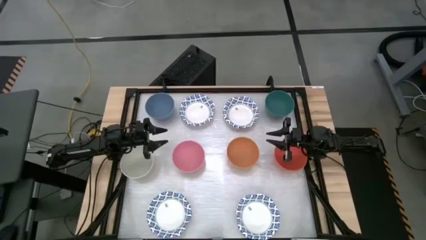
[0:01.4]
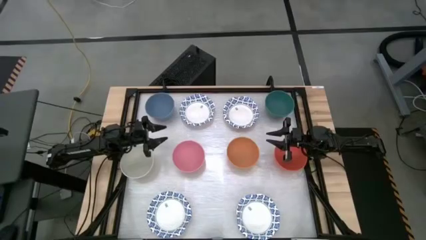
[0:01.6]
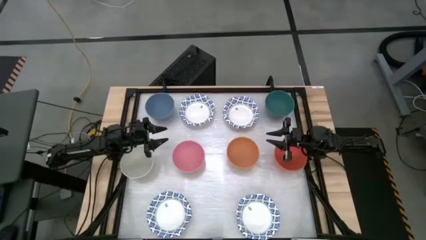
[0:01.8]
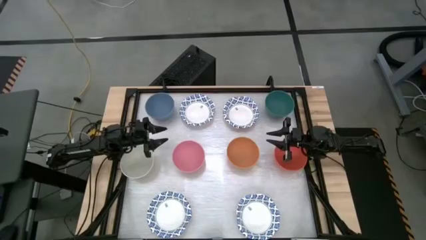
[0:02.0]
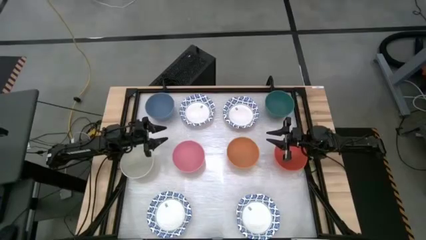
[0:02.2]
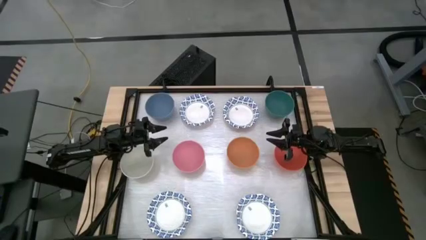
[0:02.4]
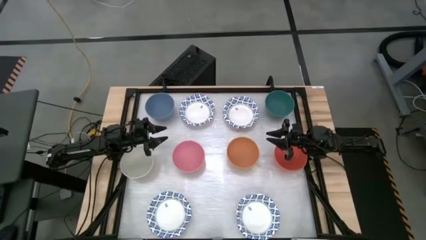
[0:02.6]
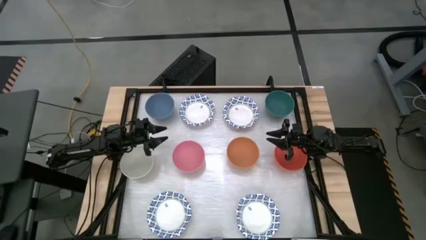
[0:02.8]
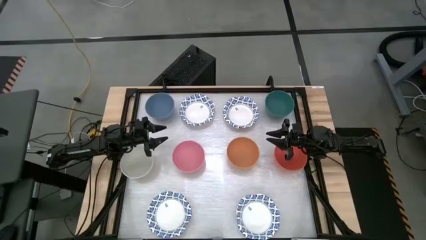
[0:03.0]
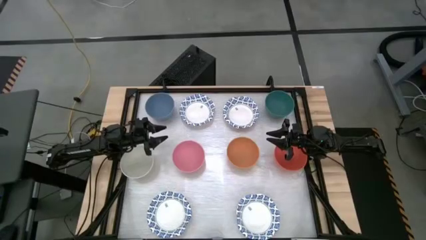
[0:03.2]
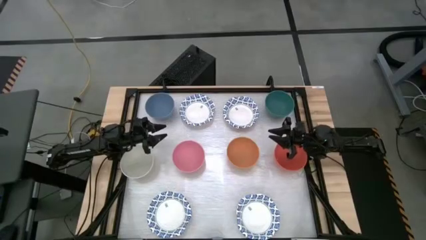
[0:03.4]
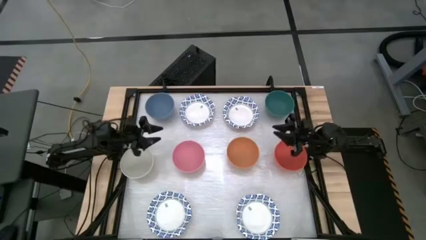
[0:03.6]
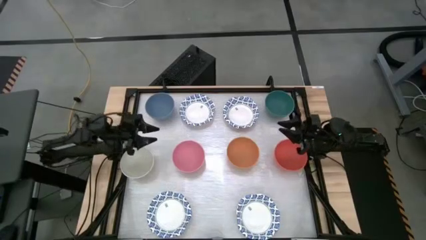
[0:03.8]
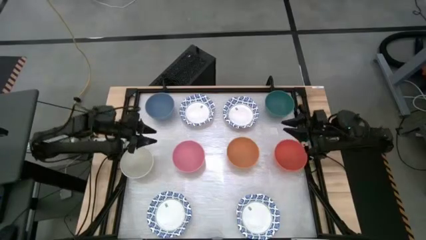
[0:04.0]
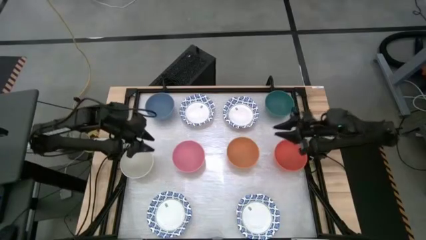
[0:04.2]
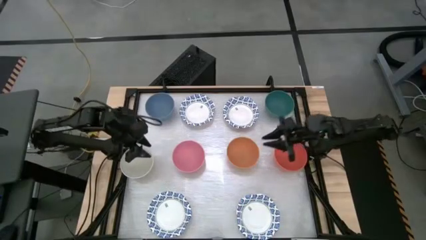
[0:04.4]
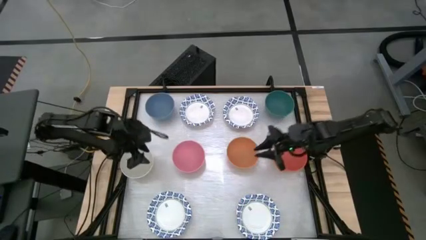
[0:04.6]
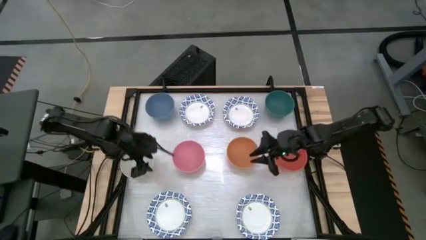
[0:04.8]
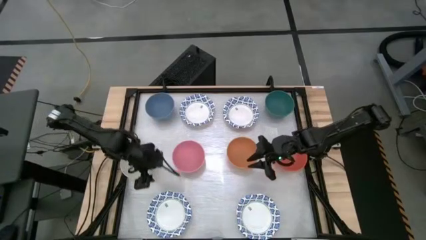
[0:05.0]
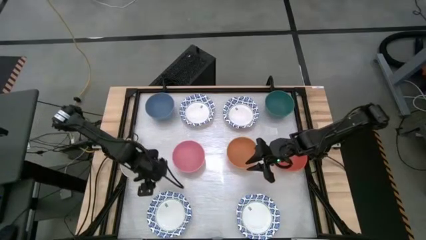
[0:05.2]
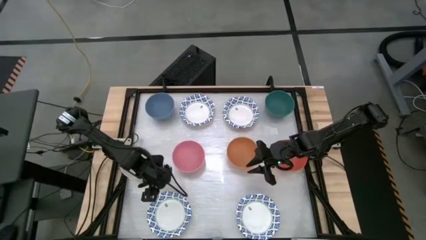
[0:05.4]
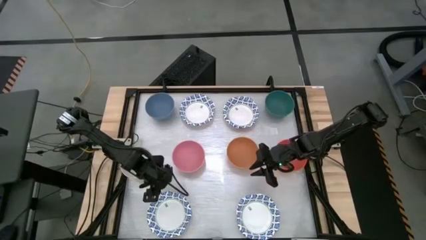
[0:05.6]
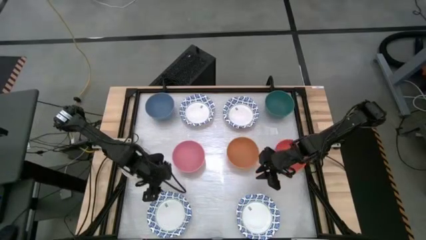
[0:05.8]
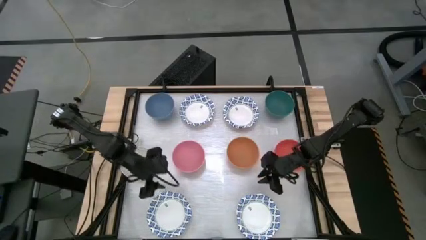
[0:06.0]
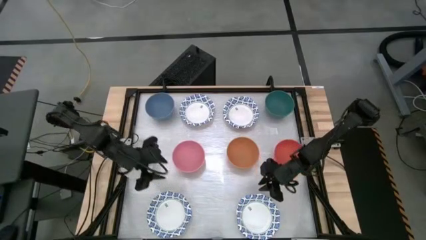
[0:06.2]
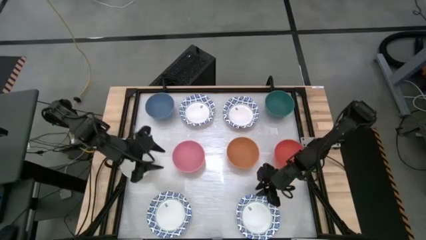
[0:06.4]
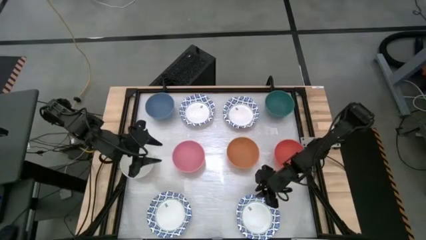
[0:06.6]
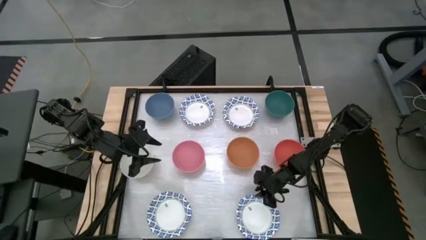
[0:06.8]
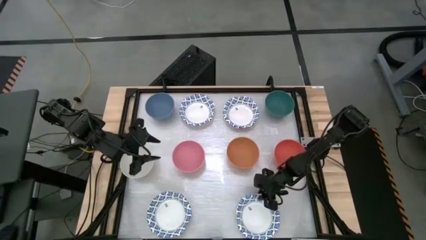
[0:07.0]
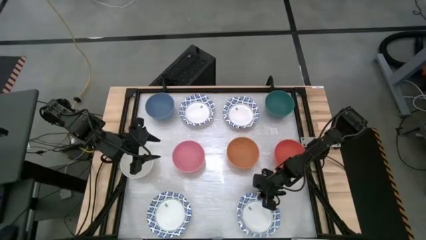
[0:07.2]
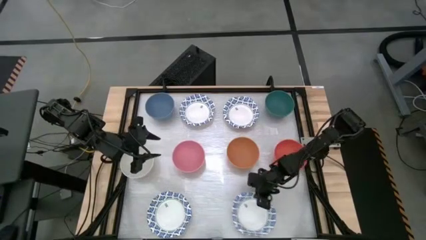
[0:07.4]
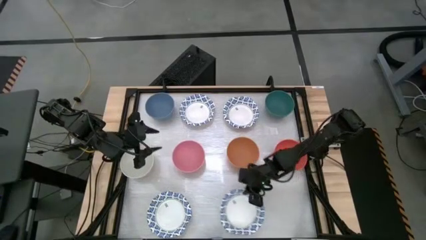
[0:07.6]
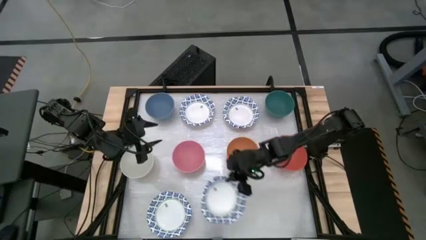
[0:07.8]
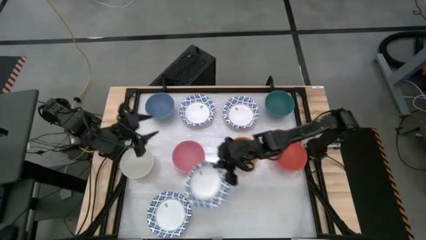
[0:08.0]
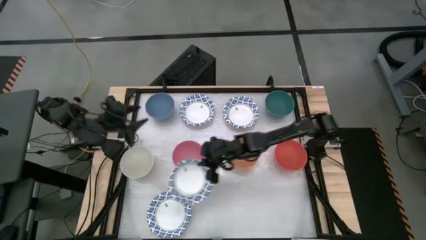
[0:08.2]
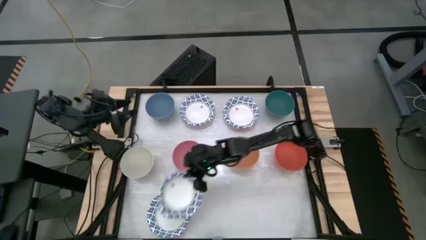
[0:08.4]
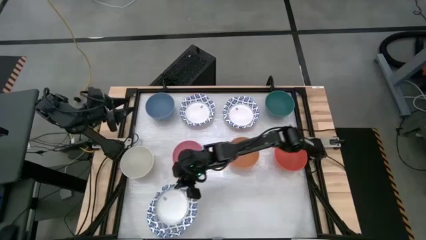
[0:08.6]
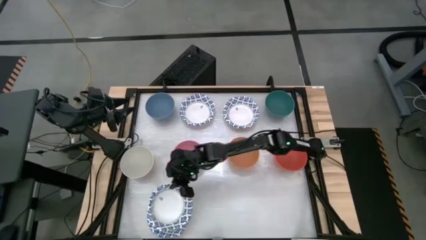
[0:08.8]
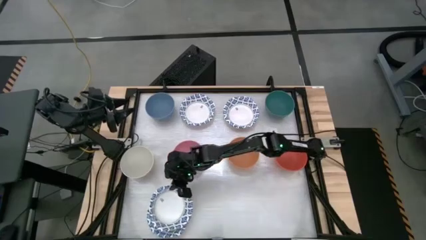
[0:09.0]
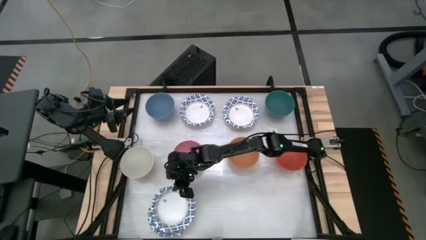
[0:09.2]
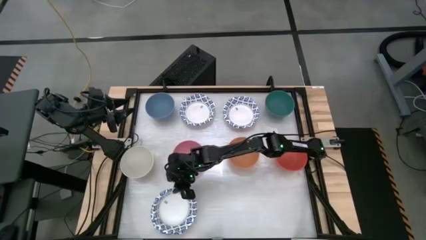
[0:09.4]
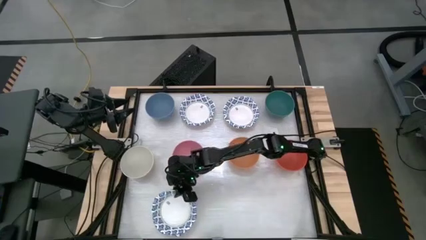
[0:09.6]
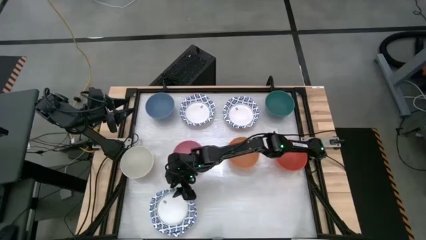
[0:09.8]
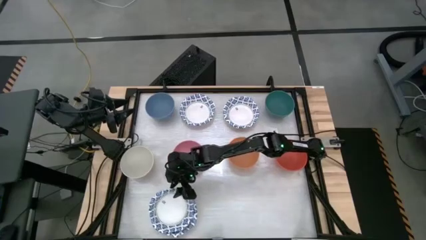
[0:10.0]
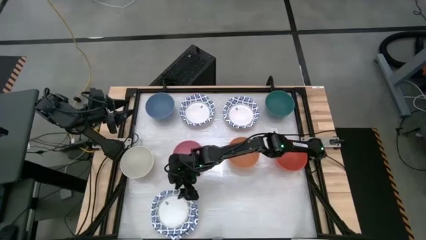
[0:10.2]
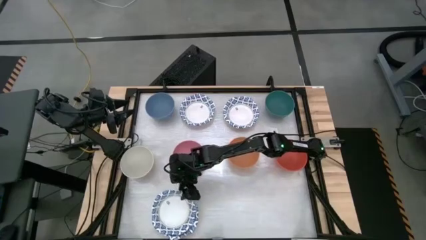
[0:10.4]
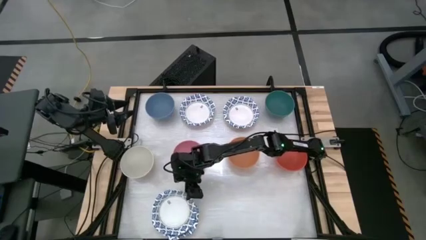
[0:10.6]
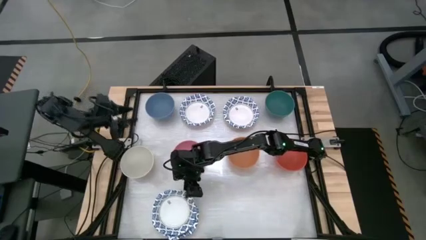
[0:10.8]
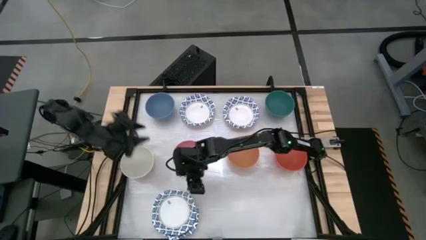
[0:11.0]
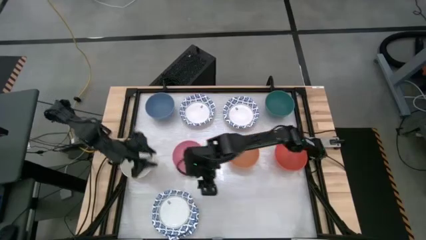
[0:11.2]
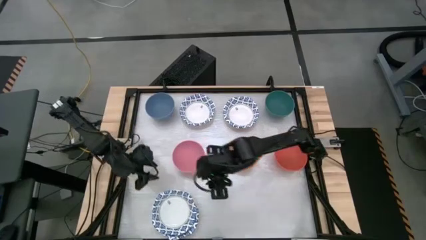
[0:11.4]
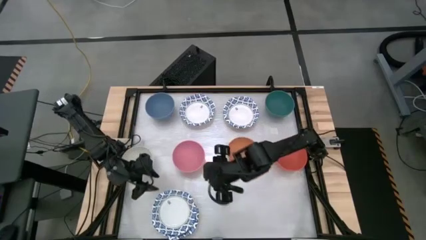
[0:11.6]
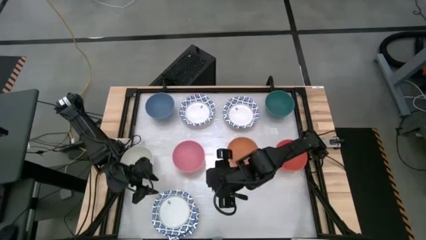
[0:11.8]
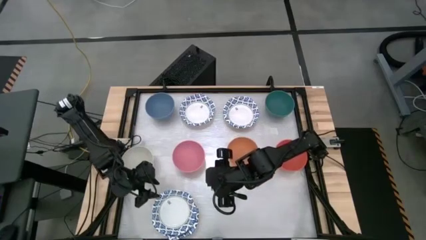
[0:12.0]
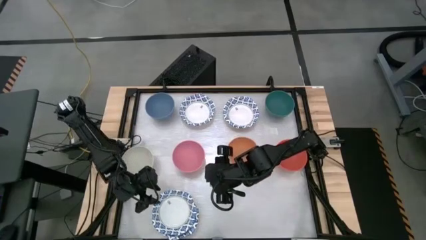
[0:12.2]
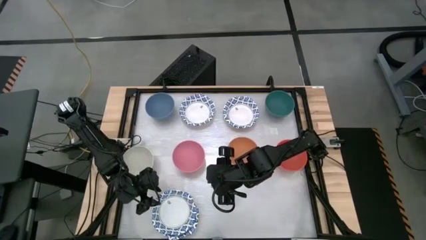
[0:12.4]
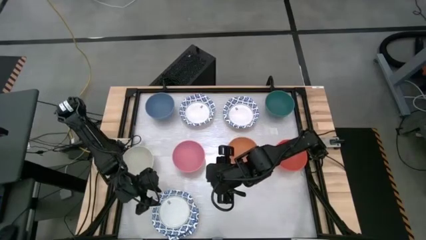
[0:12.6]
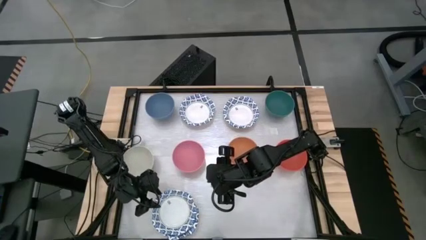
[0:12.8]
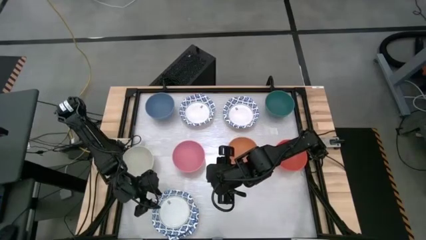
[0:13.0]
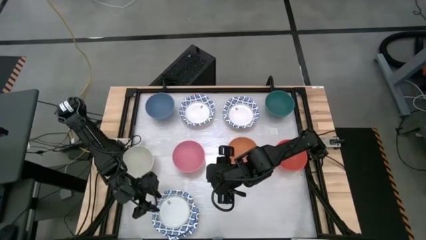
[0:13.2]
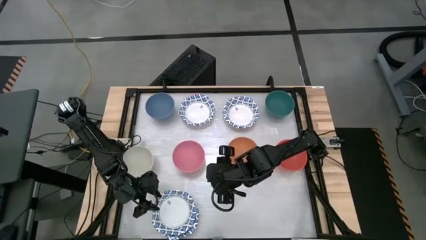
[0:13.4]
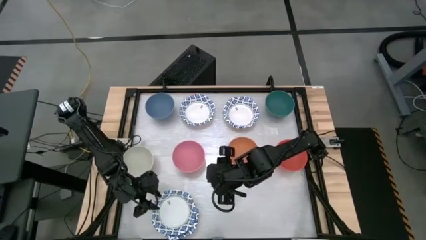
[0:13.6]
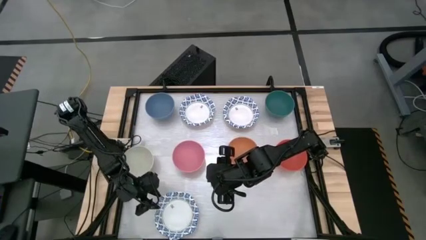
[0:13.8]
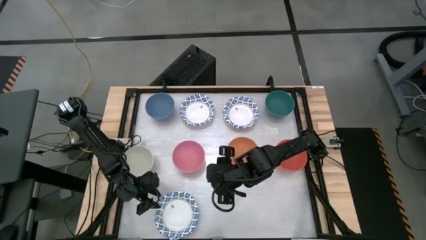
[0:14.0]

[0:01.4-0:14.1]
Stack the blue patterned bowl on top of the other blue patterned bowl
